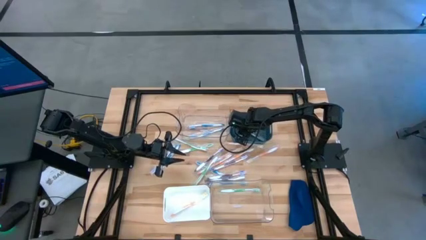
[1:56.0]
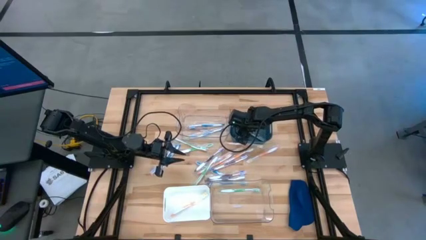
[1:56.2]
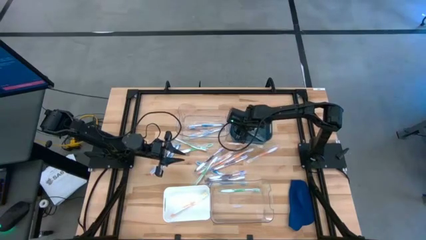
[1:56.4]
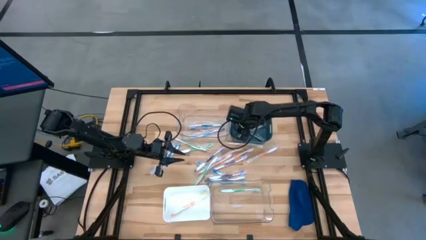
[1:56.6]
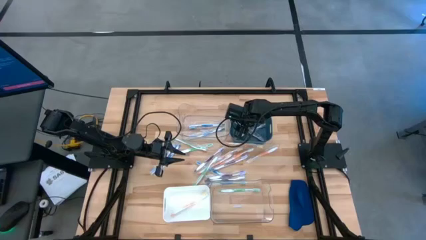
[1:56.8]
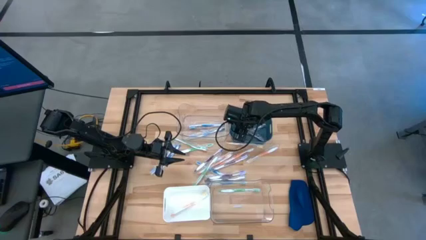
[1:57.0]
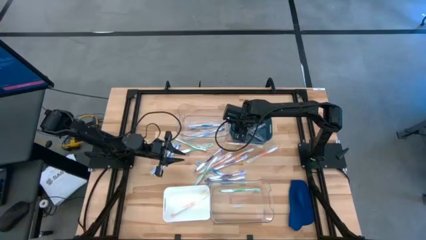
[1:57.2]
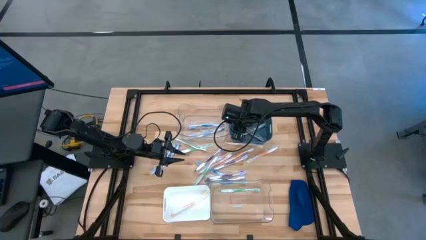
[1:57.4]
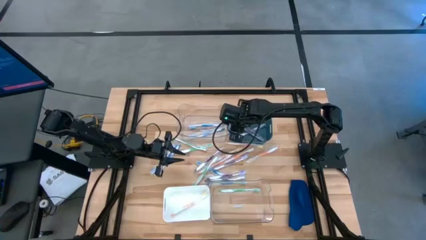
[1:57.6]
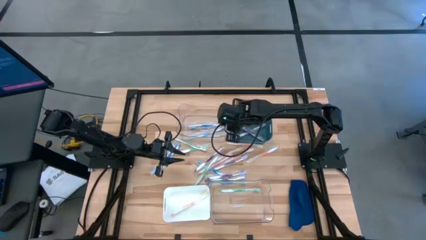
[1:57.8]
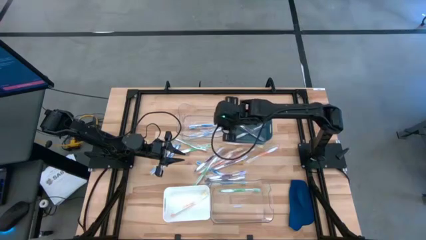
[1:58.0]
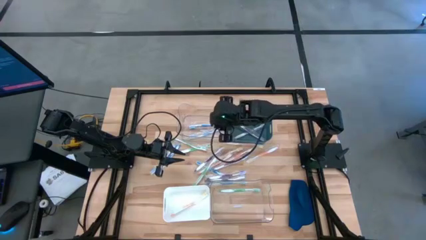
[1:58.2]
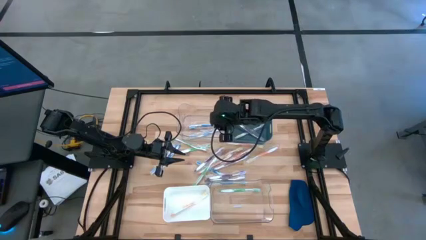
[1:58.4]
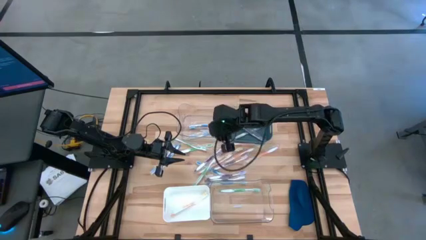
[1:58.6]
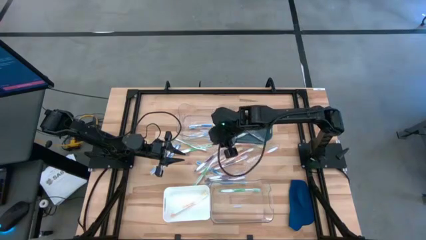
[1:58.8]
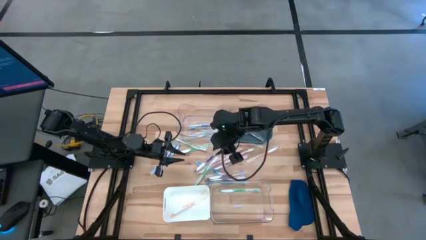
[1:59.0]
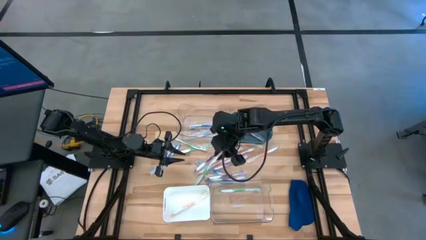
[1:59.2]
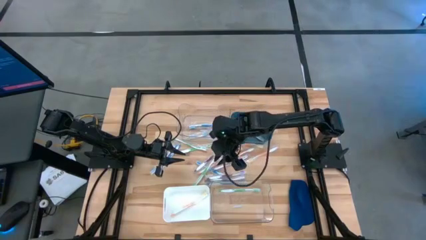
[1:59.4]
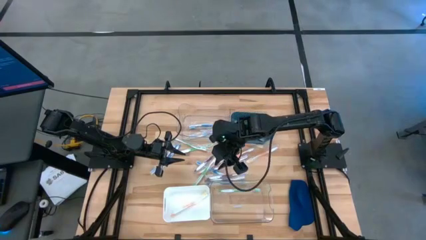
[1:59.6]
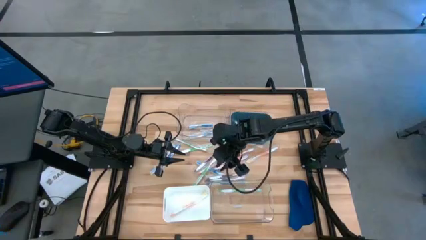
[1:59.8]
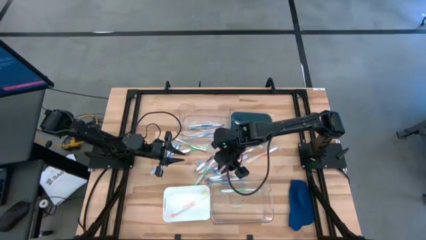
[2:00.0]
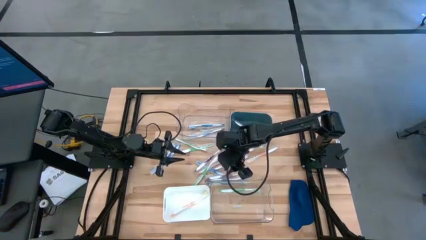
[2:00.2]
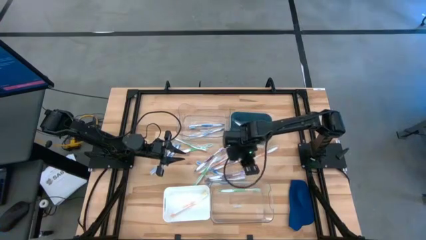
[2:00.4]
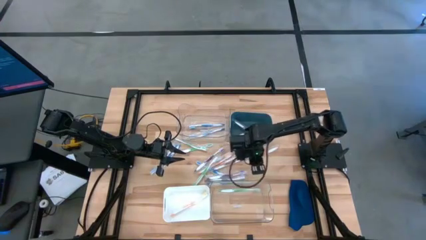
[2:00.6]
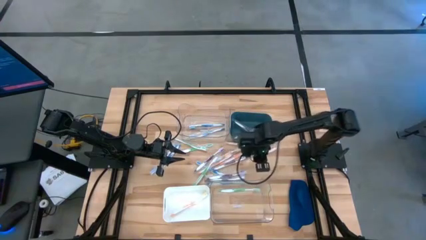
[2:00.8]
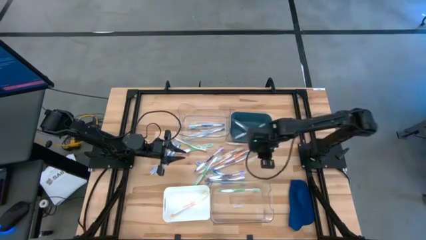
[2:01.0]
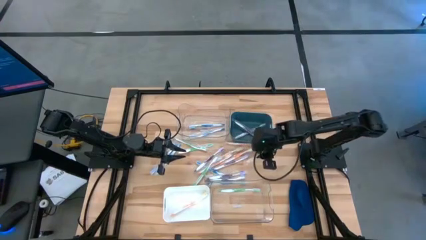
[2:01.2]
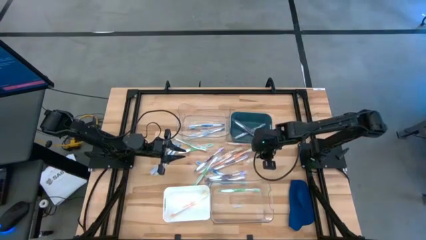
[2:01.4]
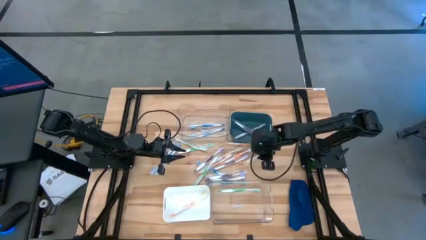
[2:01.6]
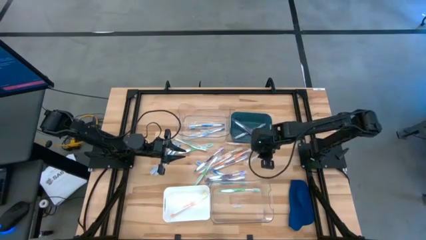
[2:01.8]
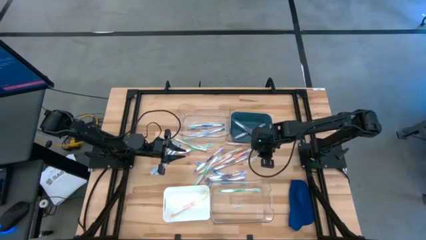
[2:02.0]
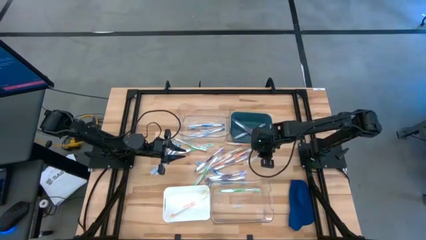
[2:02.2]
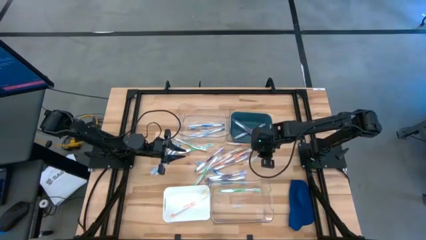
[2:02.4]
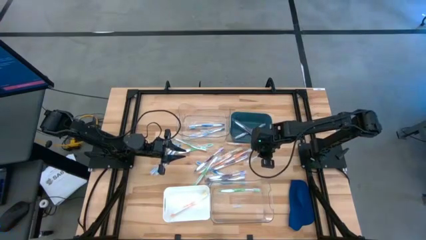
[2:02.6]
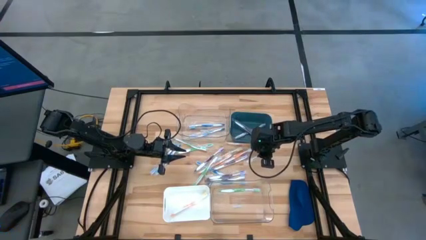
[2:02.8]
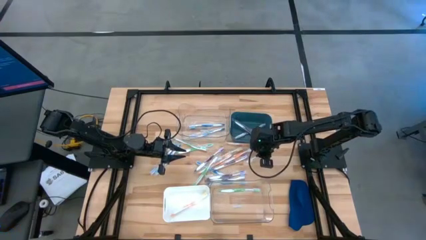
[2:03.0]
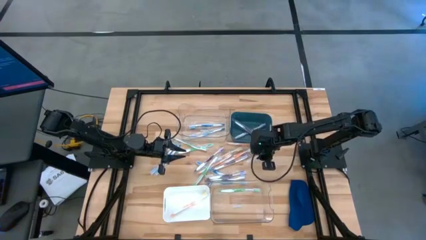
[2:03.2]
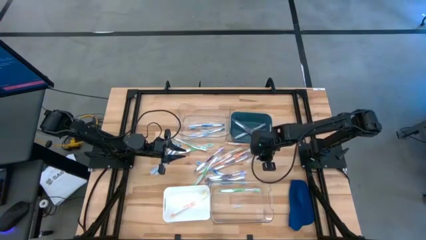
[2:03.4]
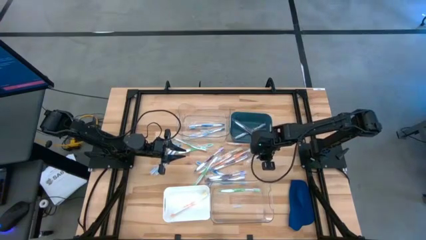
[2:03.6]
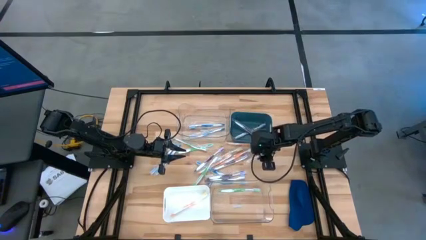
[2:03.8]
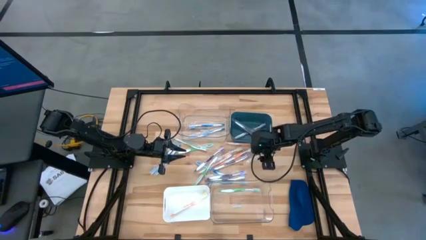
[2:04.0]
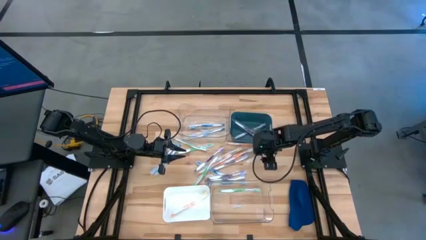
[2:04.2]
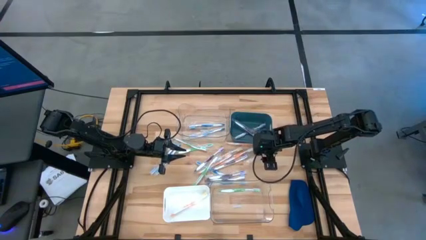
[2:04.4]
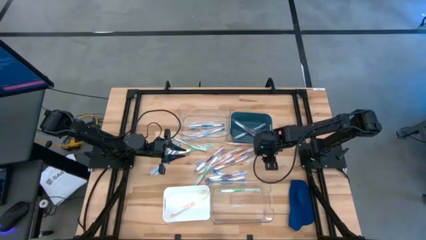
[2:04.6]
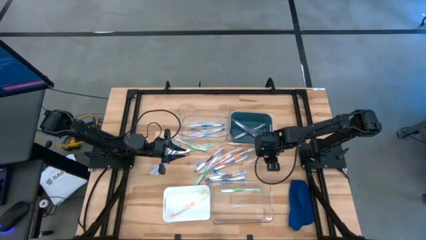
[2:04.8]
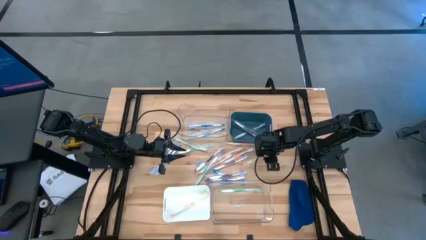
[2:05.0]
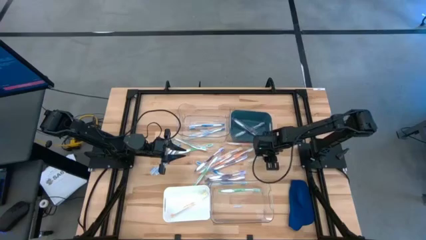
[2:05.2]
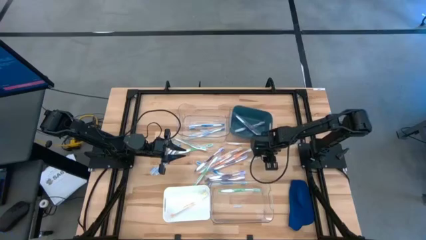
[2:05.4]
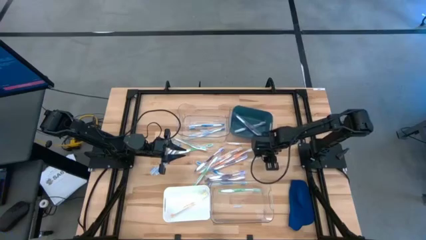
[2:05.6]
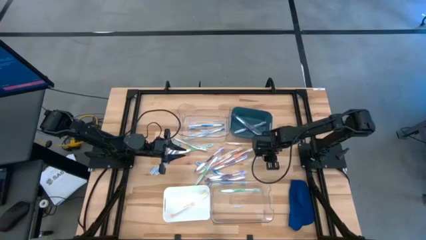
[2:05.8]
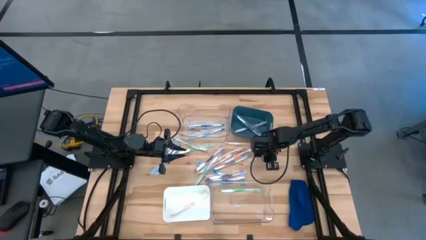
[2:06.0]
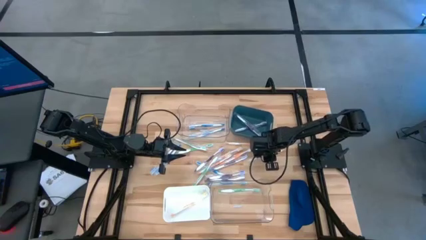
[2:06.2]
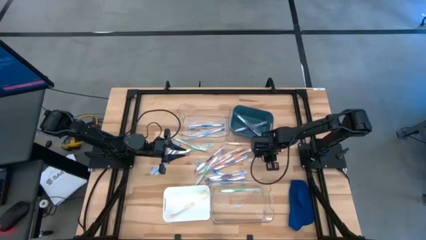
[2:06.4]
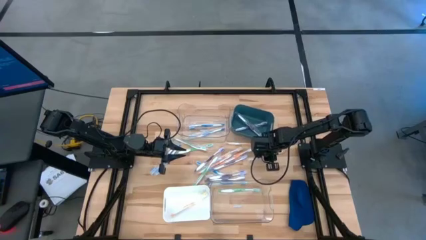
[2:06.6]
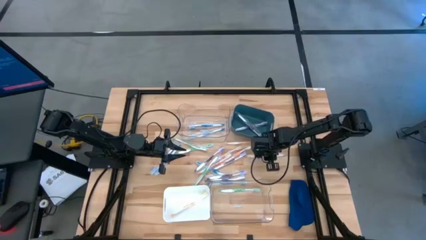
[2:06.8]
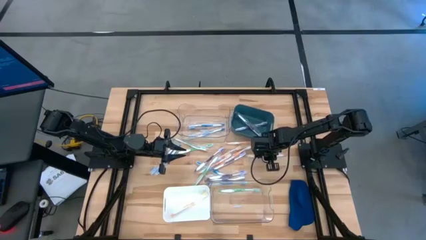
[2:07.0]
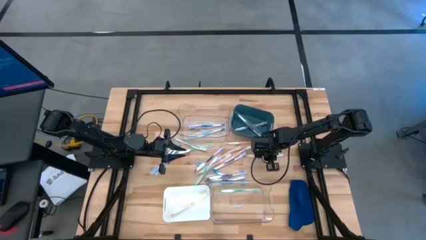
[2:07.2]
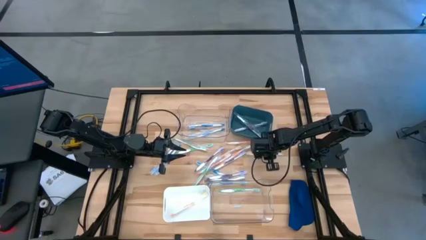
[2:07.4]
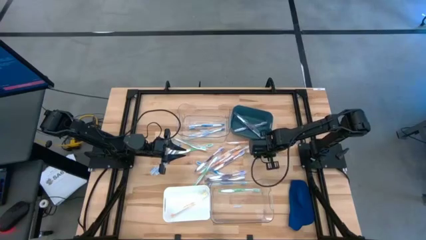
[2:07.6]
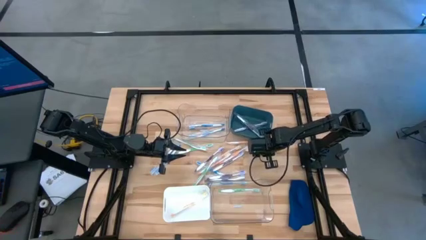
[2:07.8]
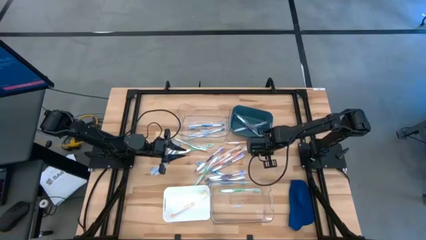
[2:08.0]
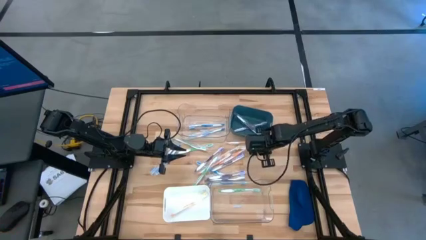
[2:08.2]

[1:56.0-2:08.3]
Task: Pick & Place Toothbrushes
Put the orange toothbrush into the white bin
